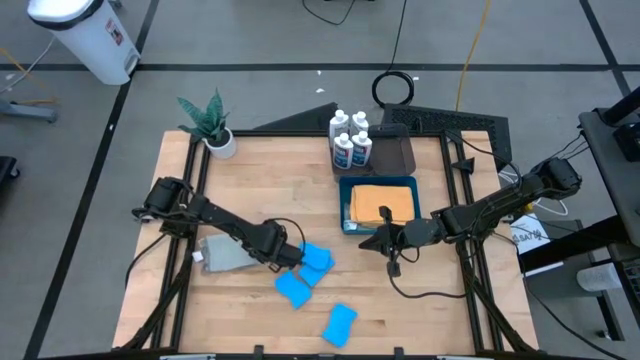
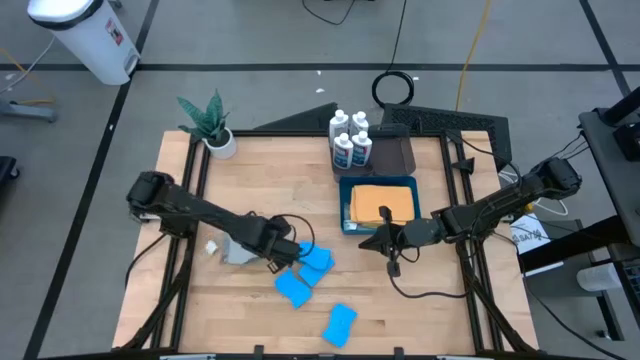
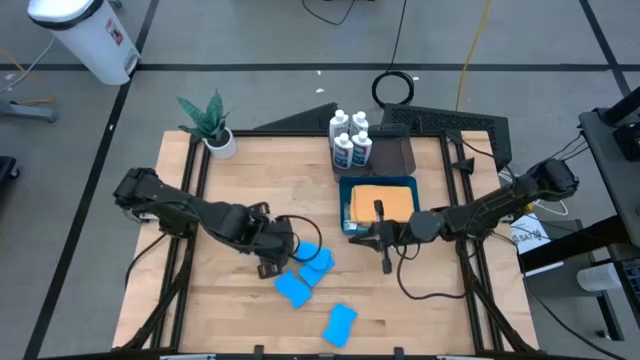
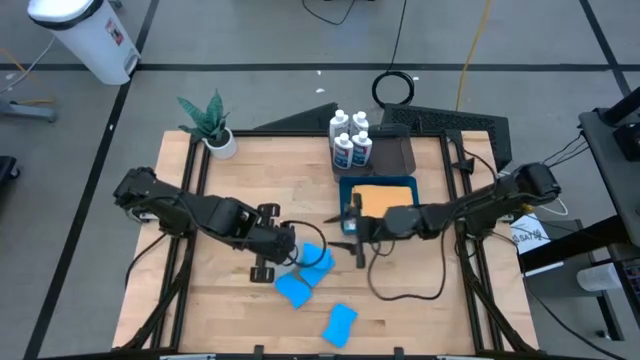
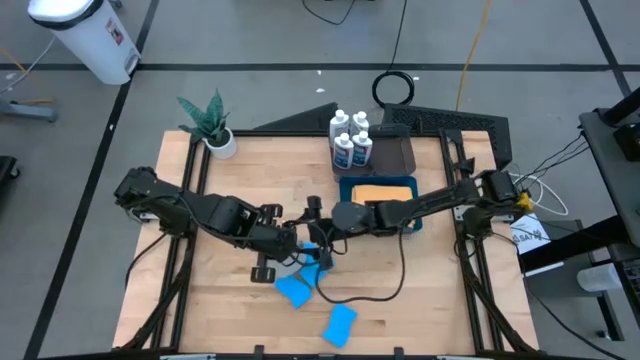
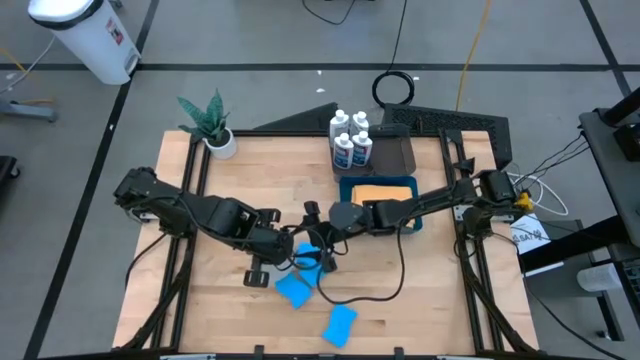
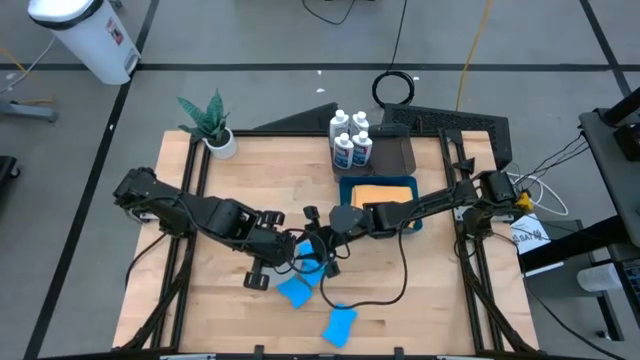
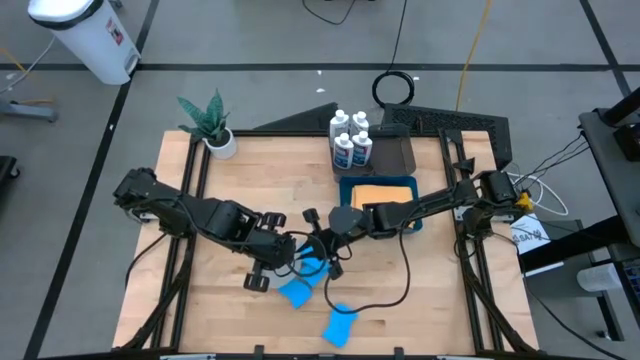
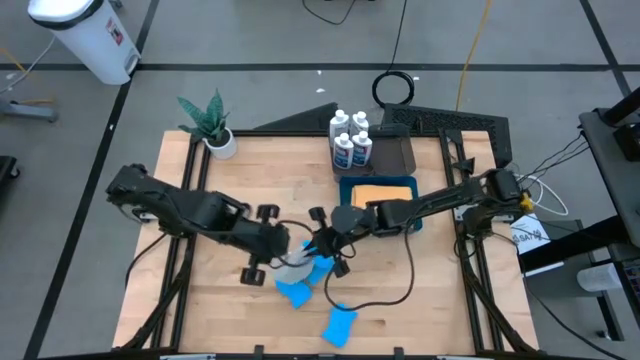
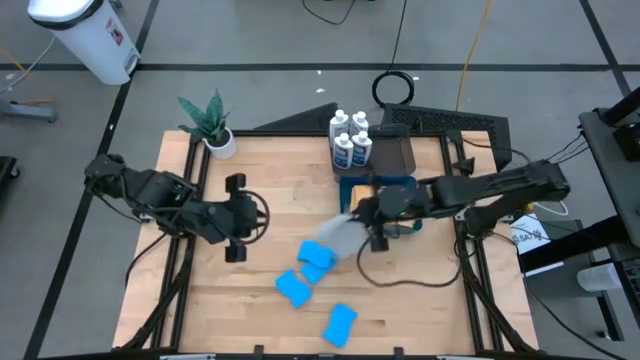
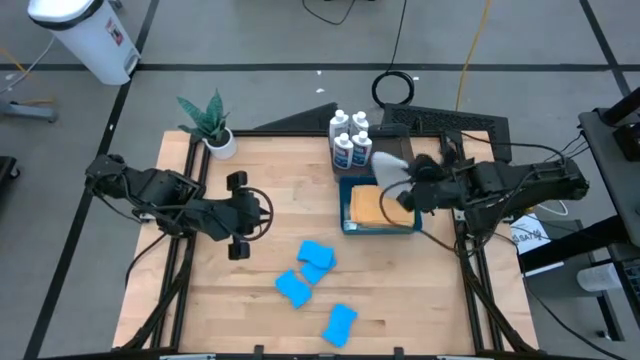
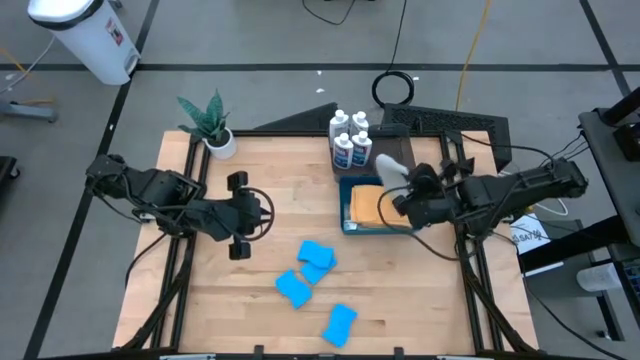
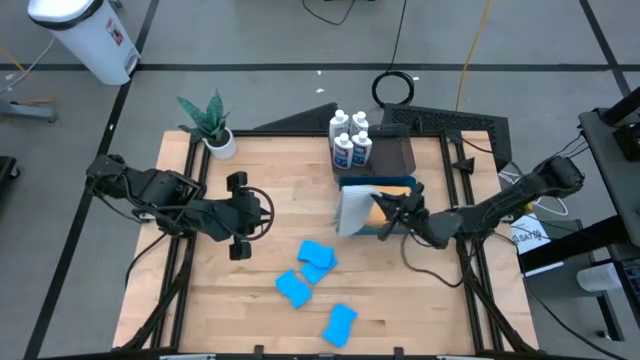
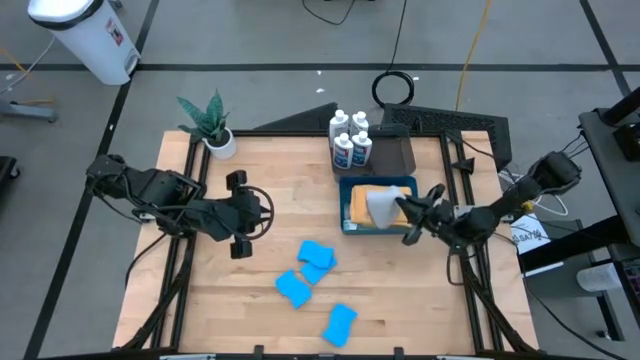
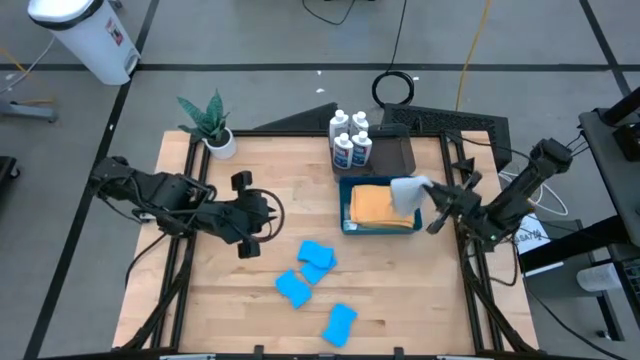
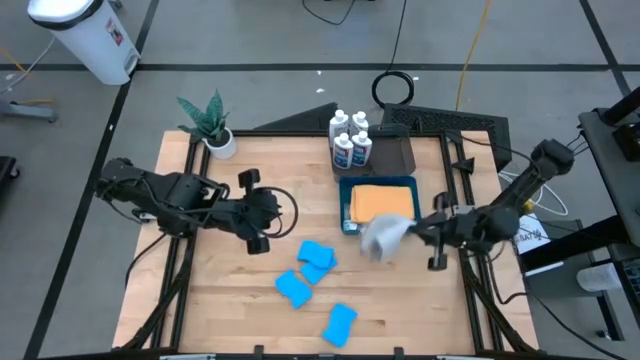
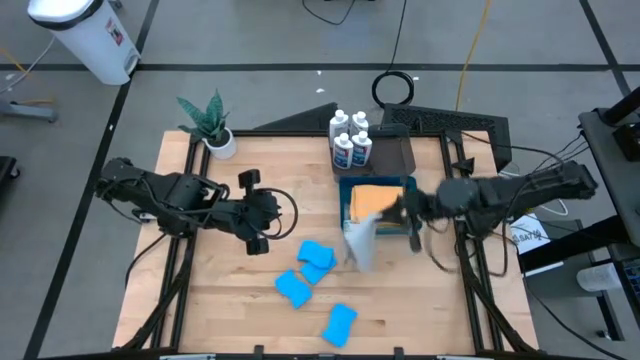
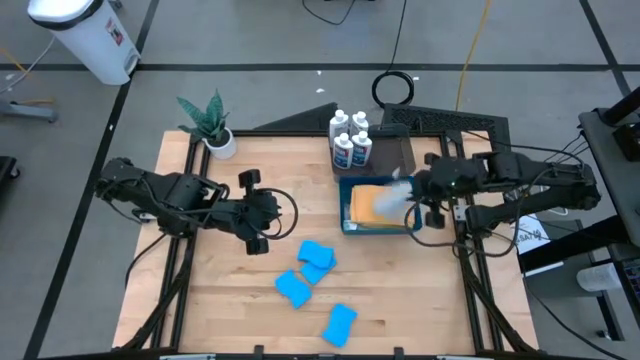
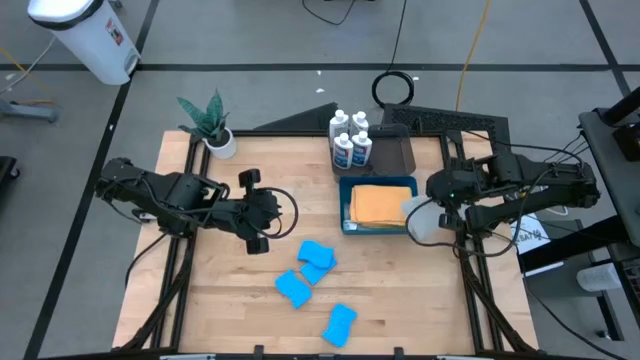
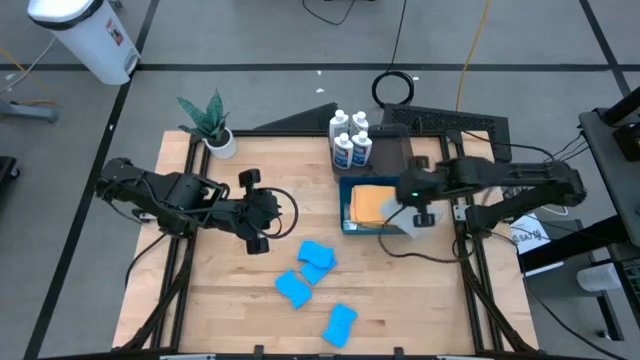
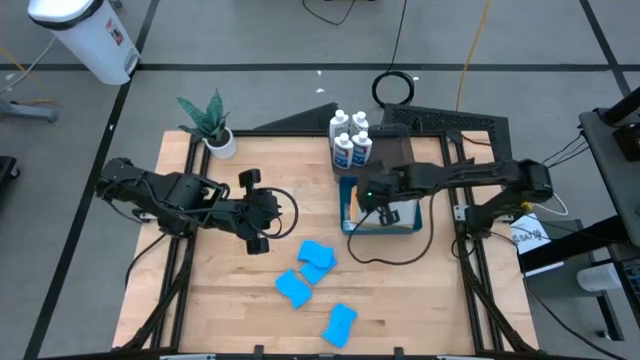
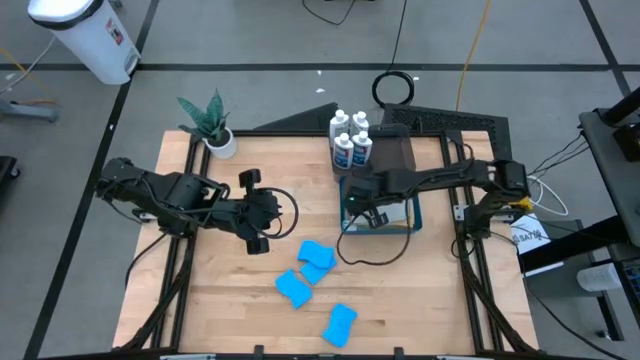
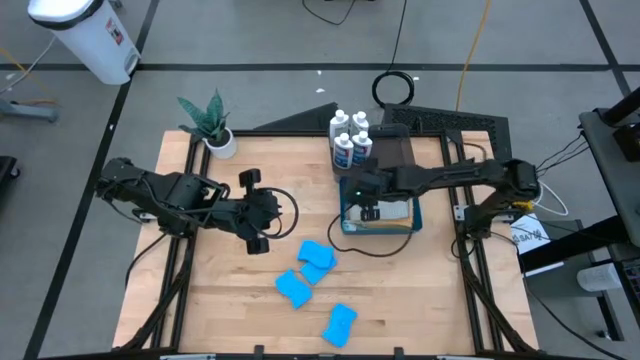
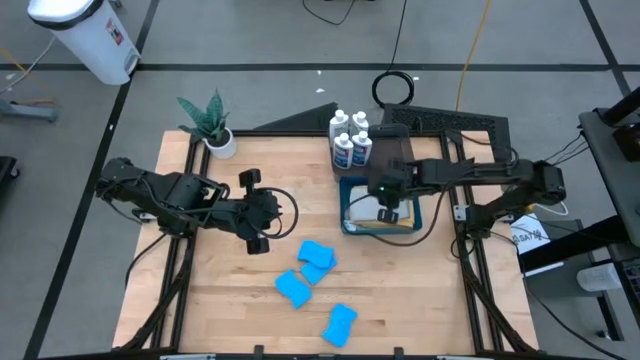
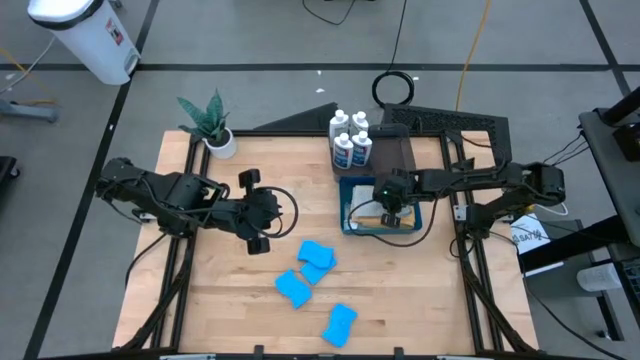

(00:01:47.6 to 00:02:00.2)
Task: Pick & Place Kitchen Items
Put the black napkin into the blue bin

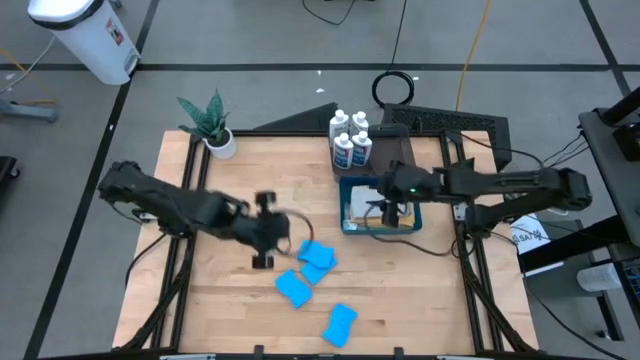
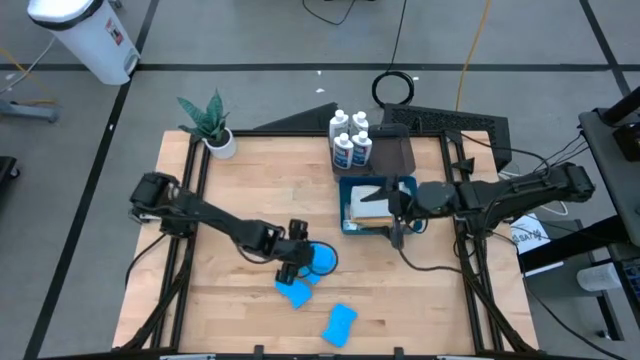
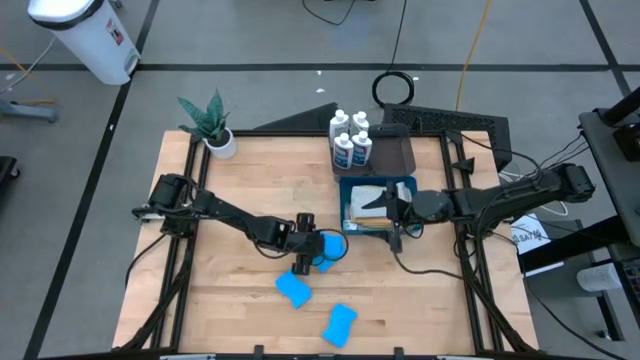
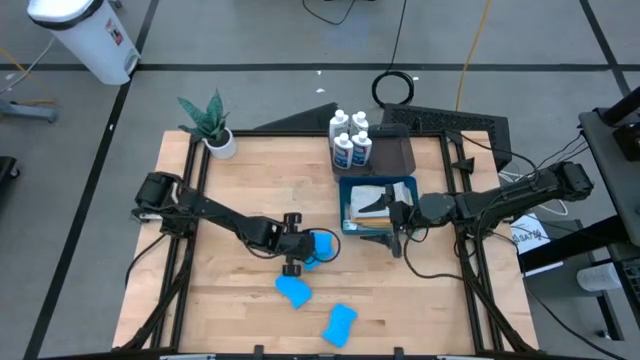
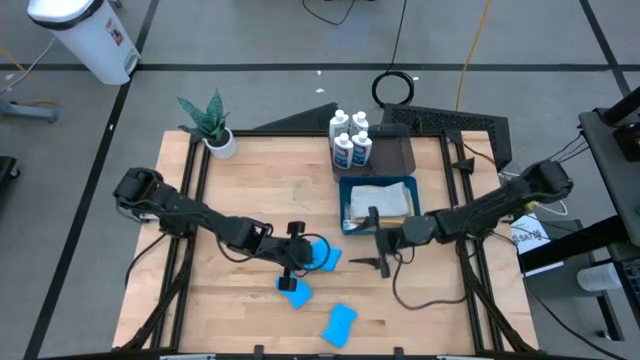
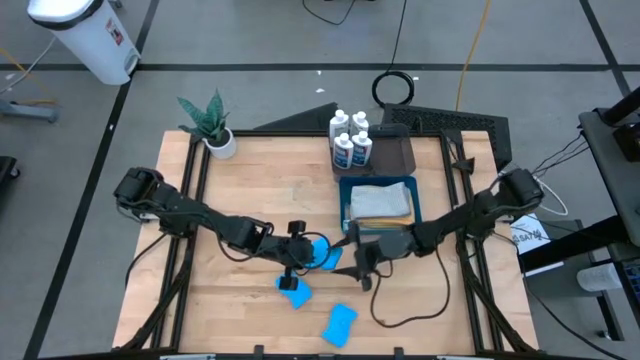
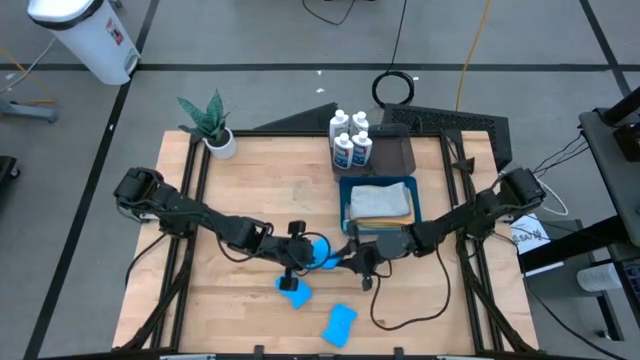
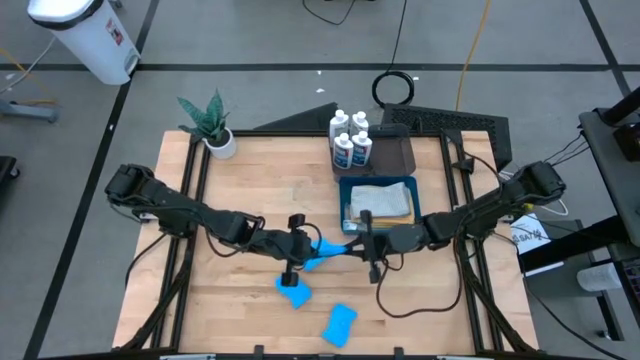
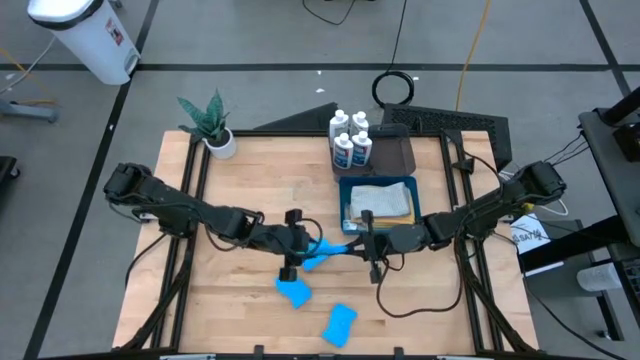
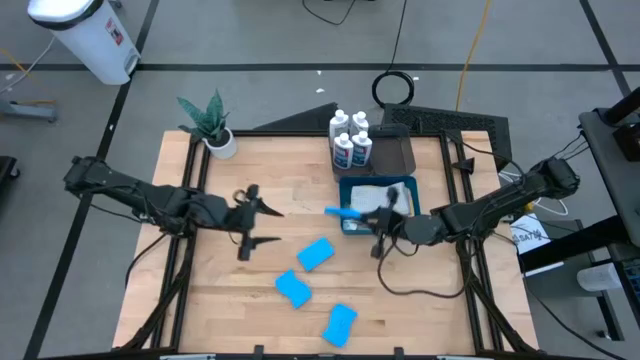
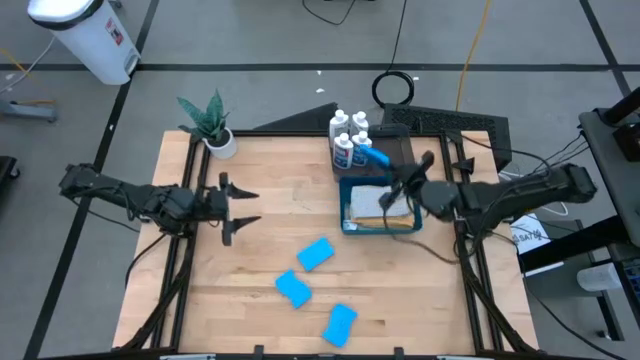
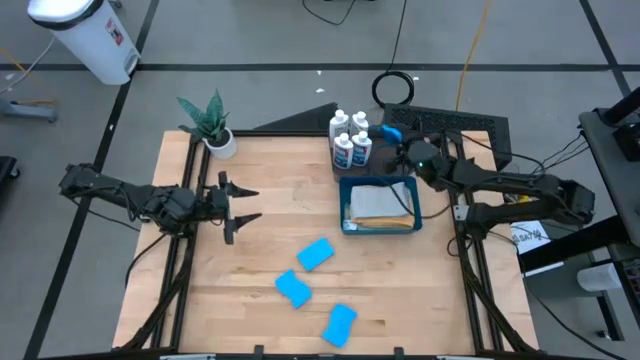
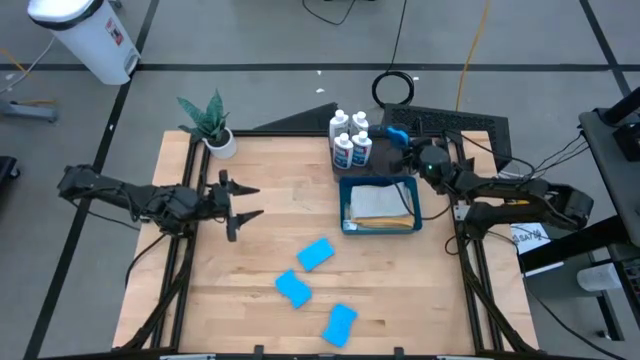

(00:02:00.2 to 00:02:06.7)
Put the blue dishwashing sponge into the right black bin

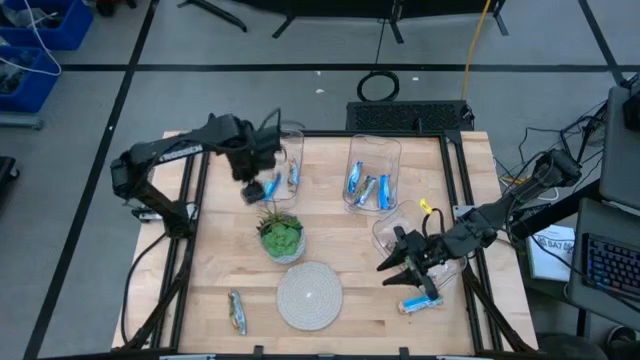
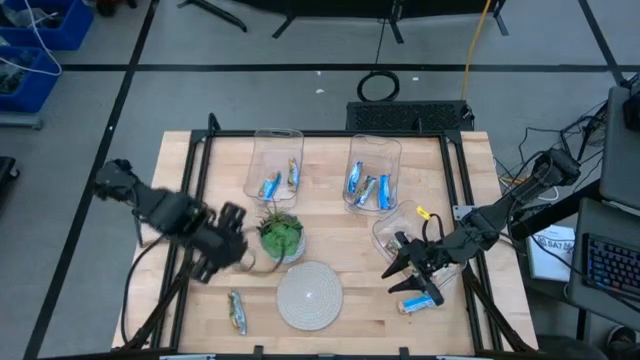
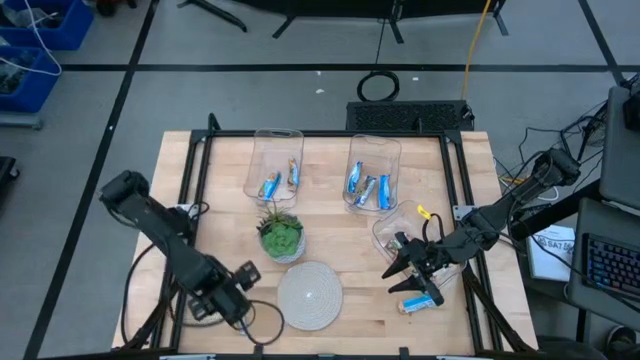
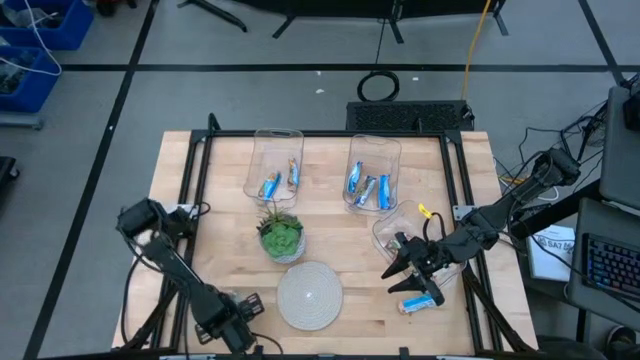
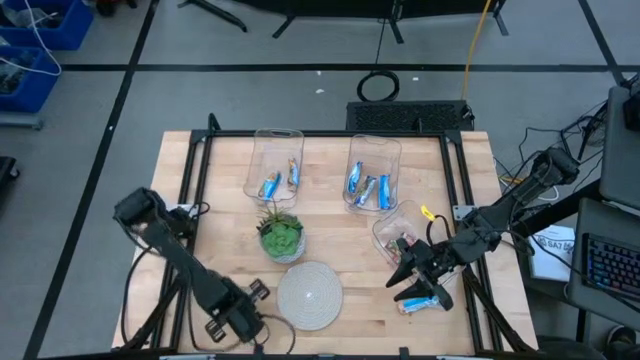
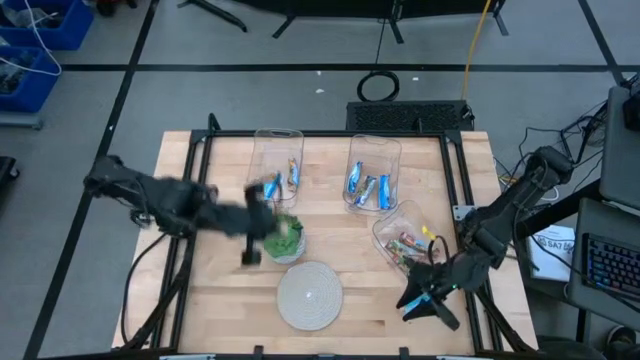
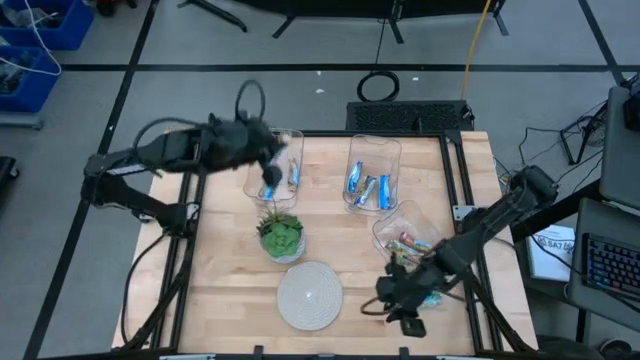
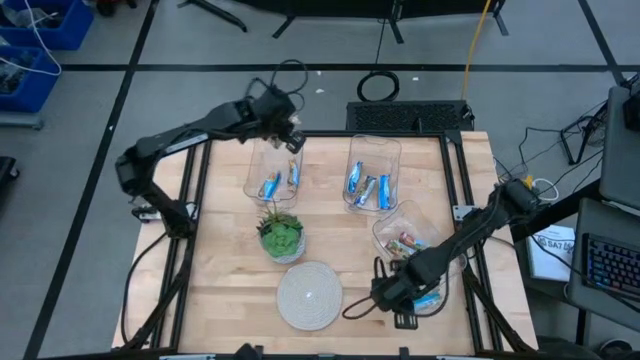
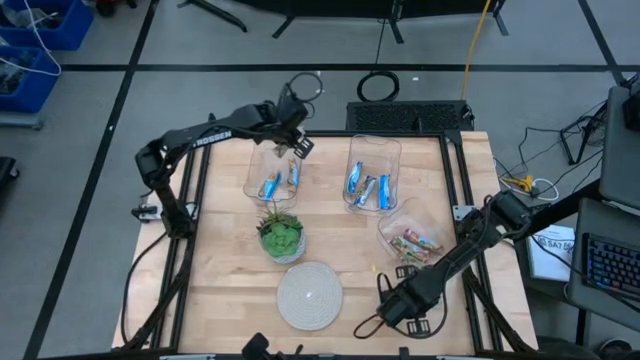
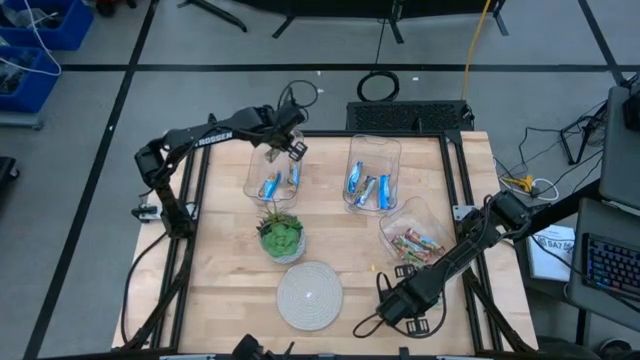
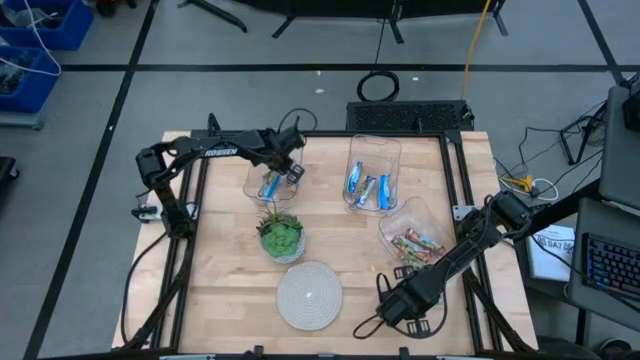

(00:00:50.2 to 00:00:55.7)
Task: Pick and place Granola Bars by type
Put the yellow granola bar into the top left transparent bin
